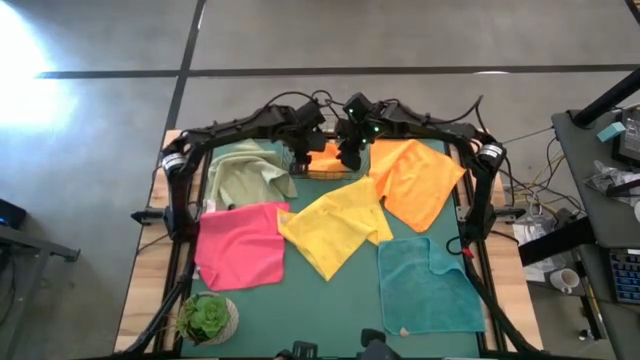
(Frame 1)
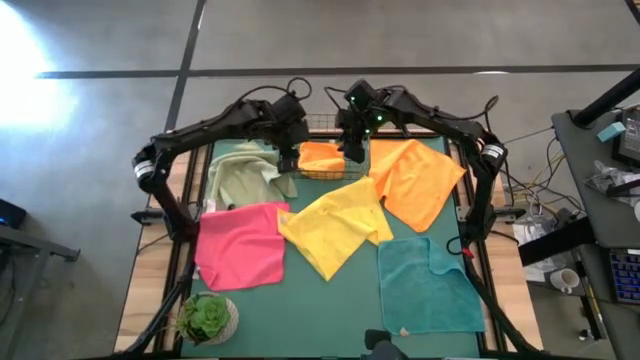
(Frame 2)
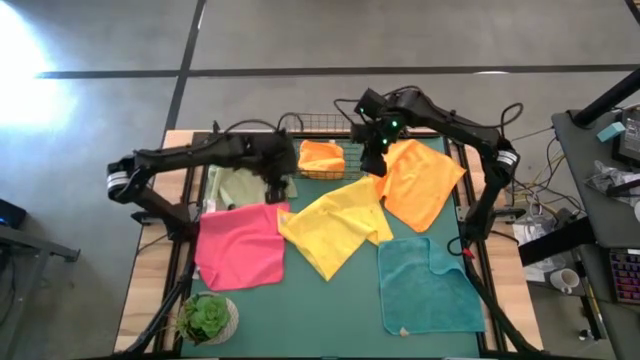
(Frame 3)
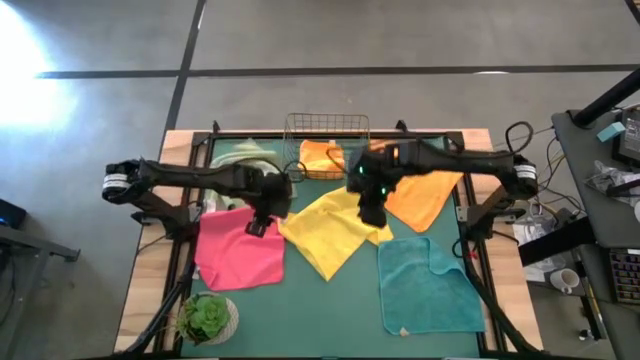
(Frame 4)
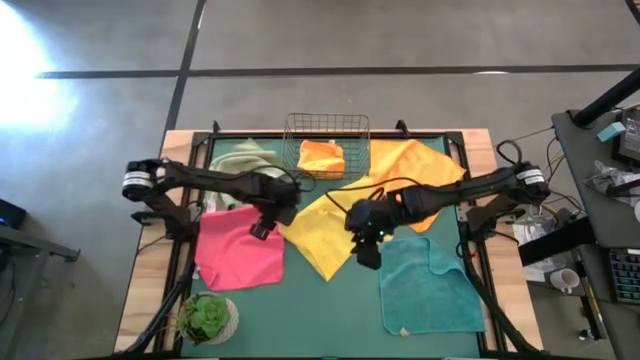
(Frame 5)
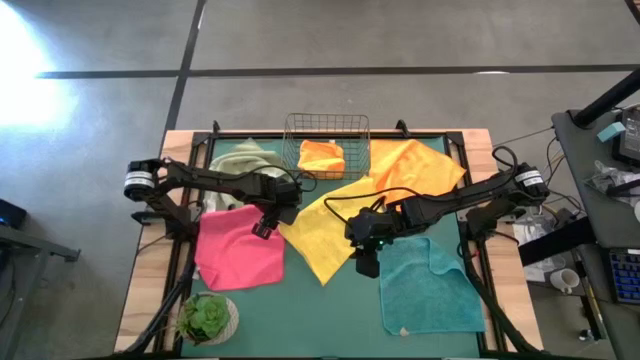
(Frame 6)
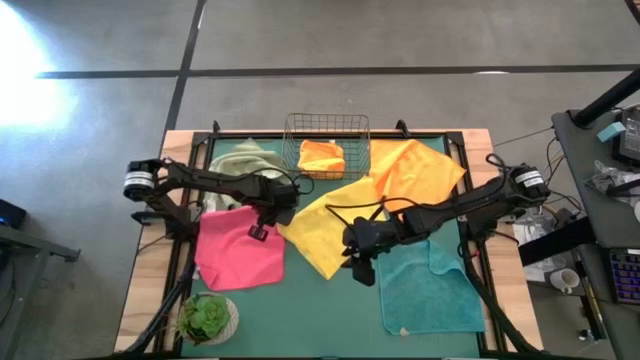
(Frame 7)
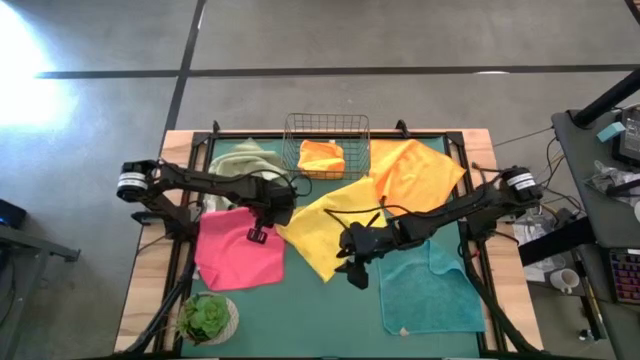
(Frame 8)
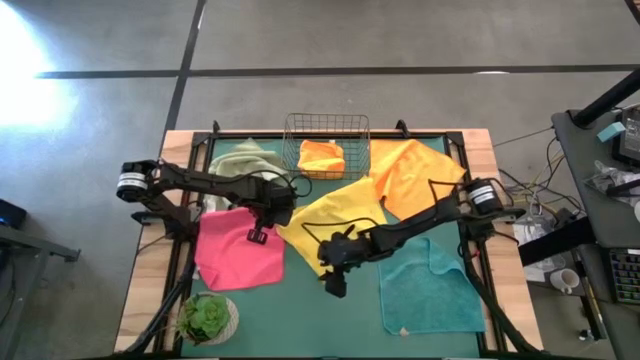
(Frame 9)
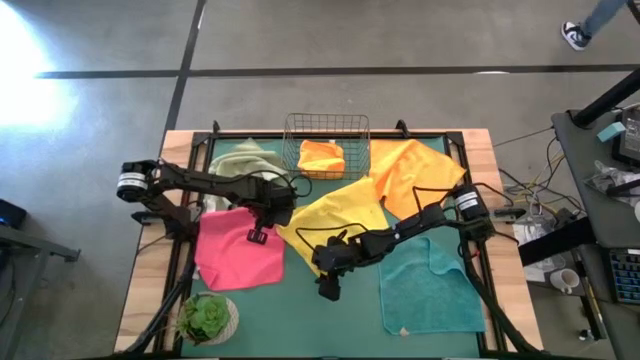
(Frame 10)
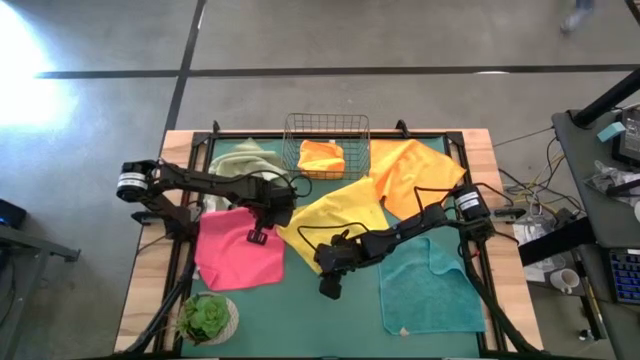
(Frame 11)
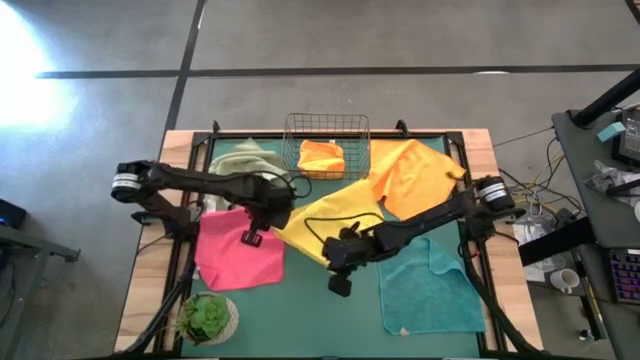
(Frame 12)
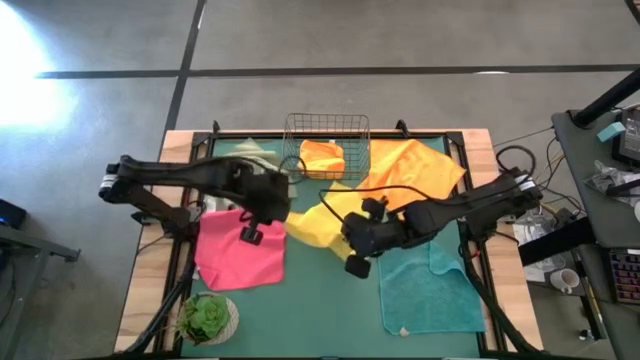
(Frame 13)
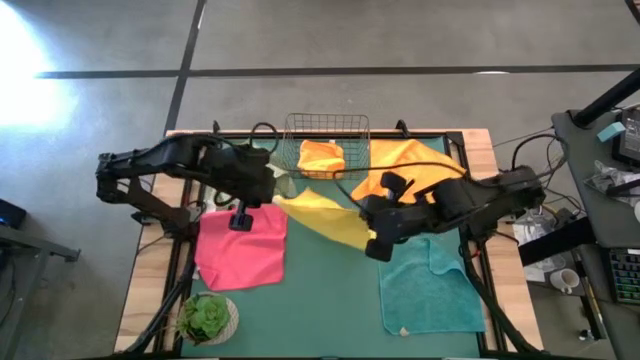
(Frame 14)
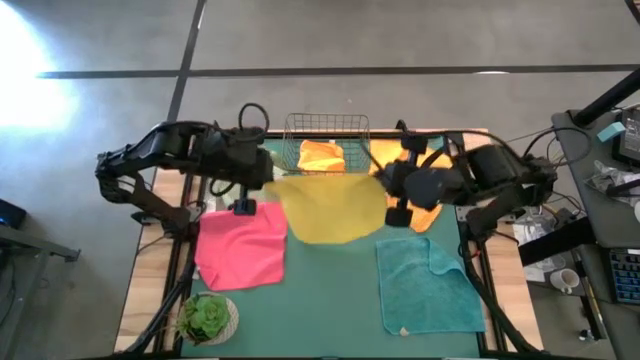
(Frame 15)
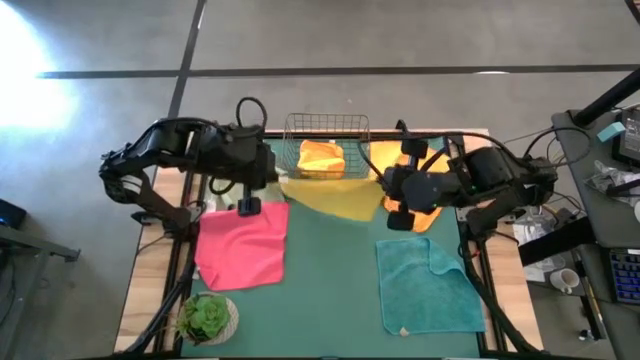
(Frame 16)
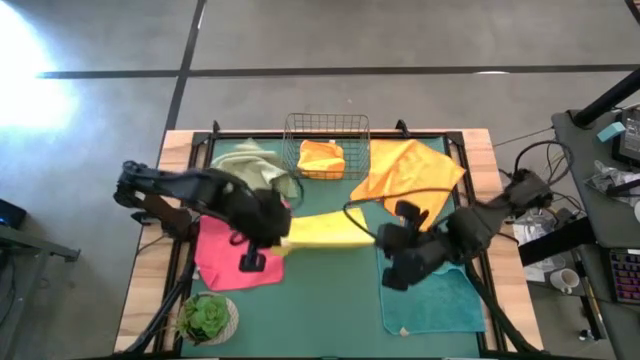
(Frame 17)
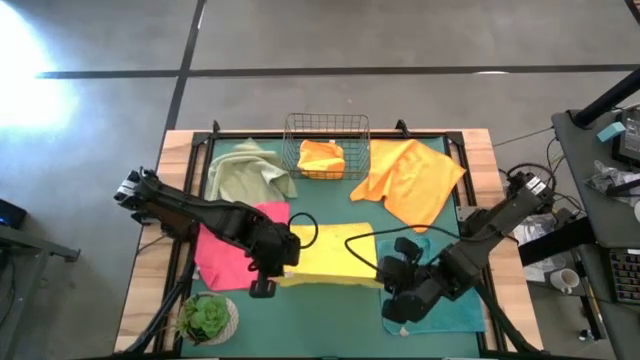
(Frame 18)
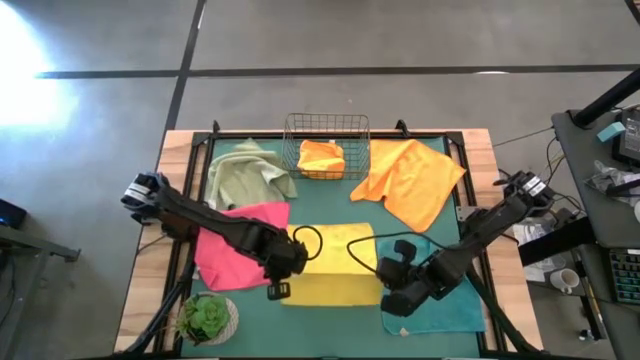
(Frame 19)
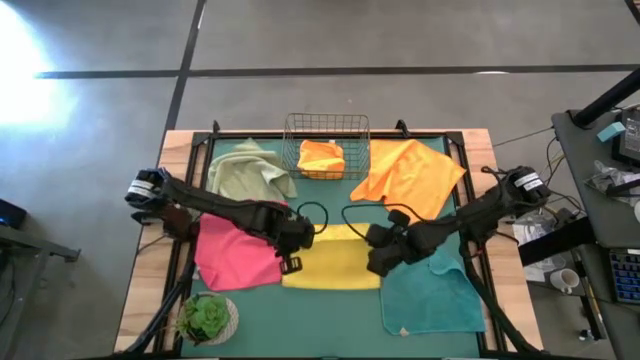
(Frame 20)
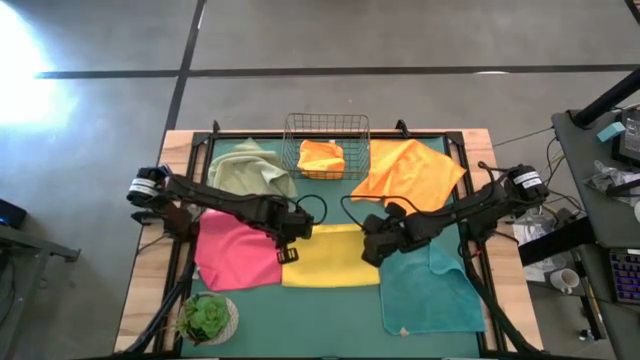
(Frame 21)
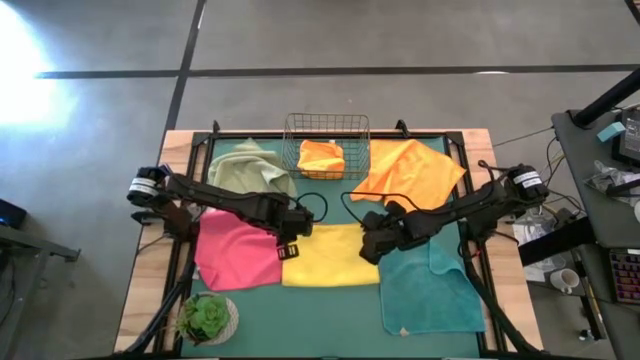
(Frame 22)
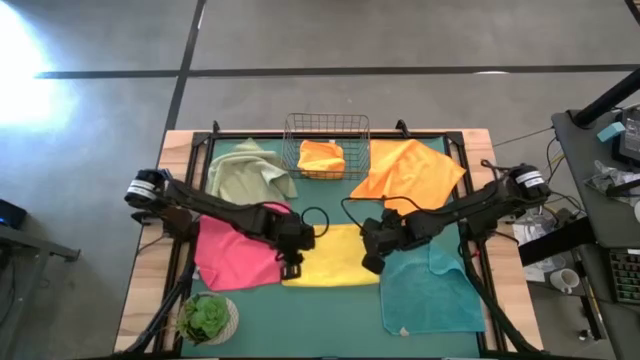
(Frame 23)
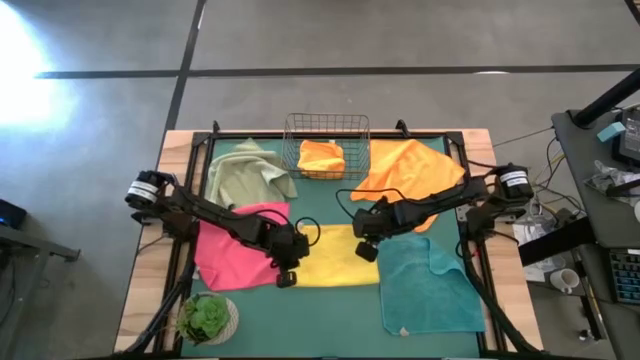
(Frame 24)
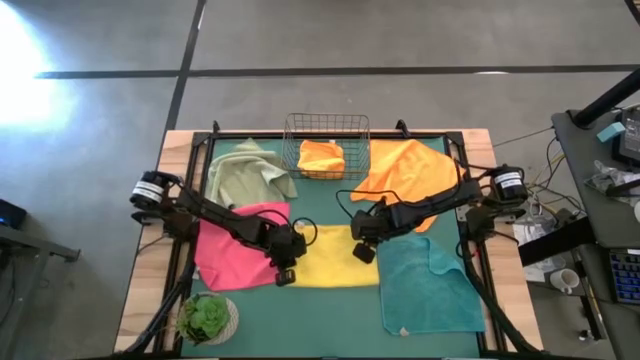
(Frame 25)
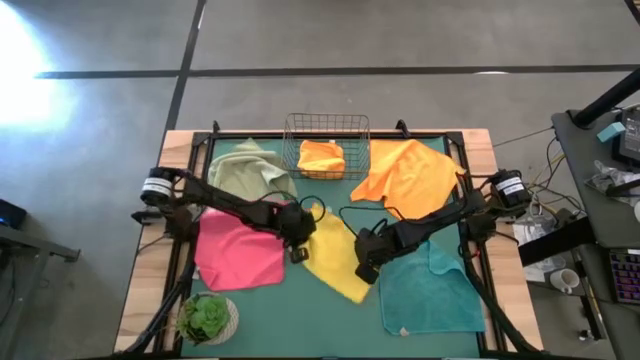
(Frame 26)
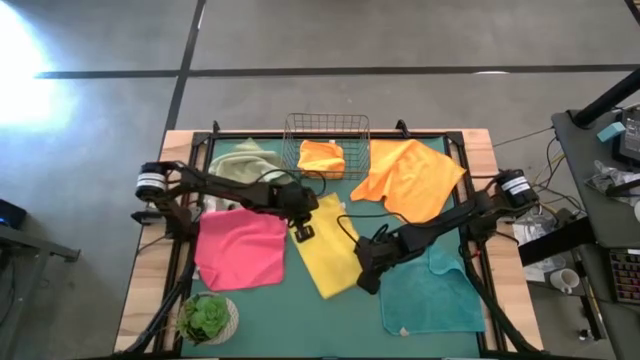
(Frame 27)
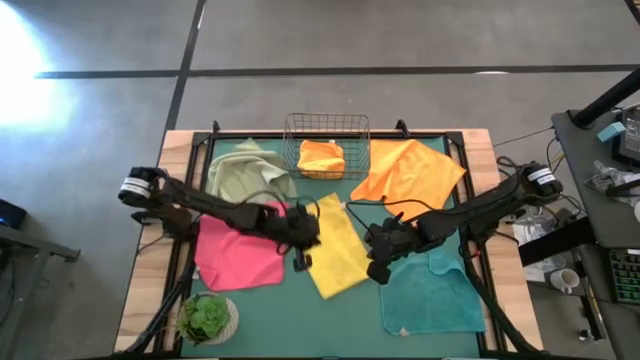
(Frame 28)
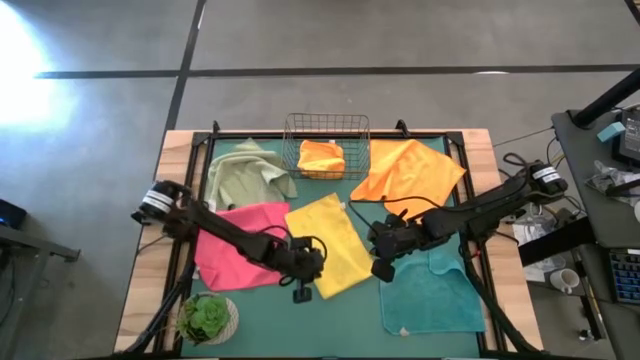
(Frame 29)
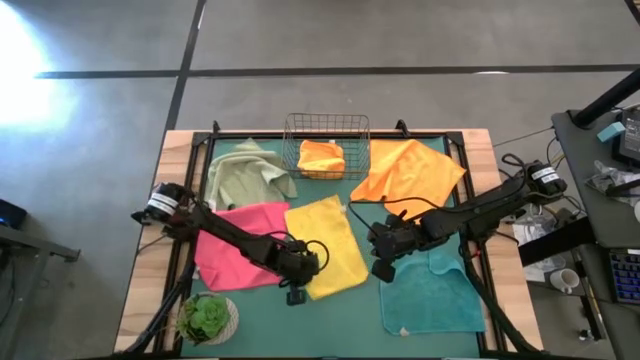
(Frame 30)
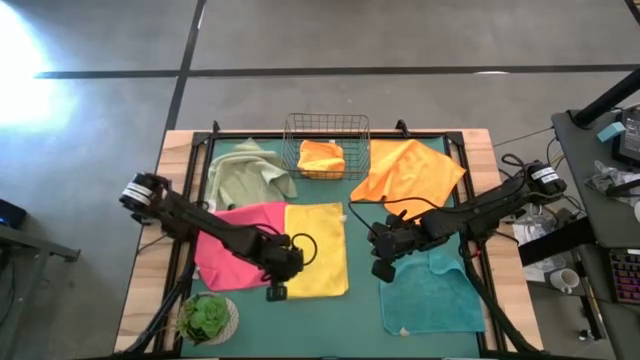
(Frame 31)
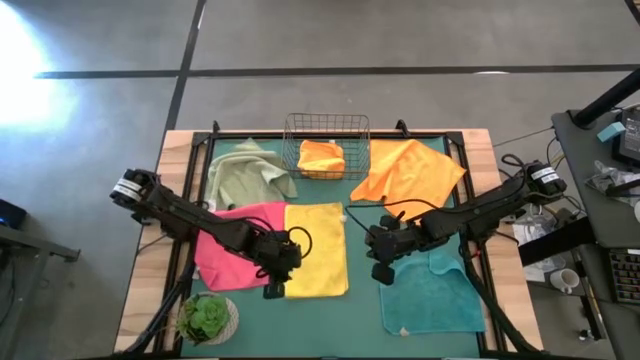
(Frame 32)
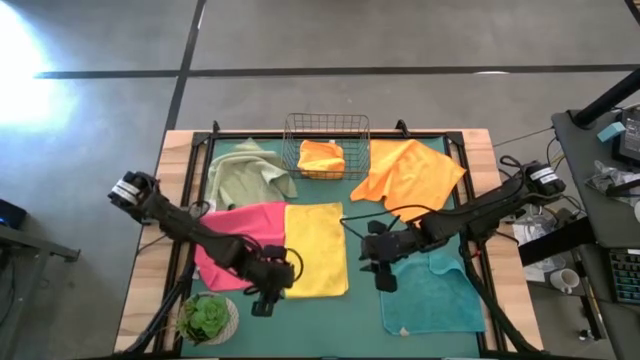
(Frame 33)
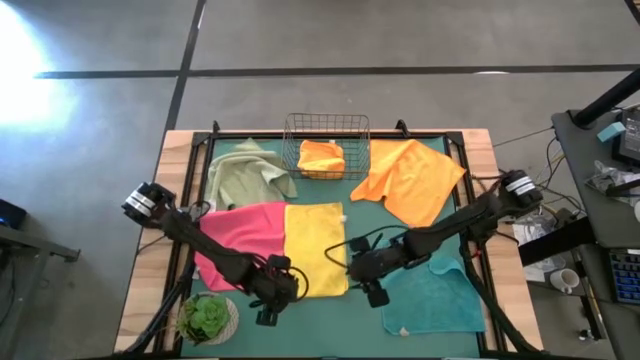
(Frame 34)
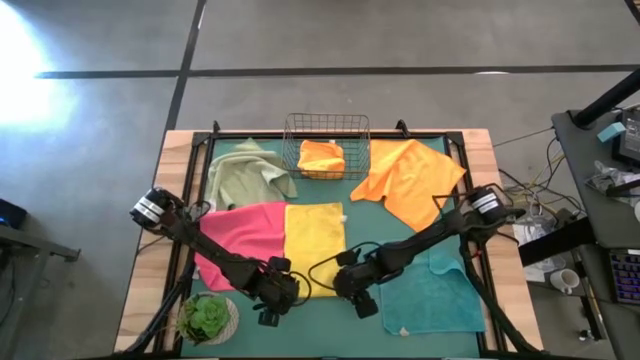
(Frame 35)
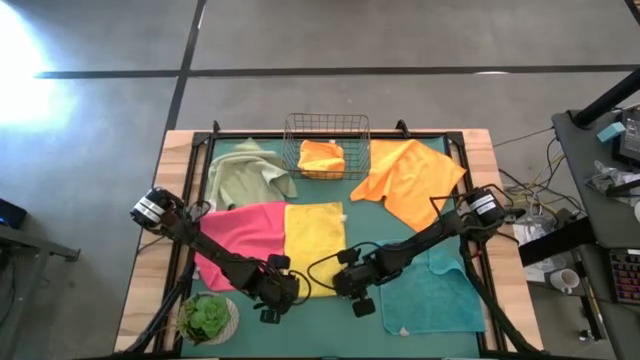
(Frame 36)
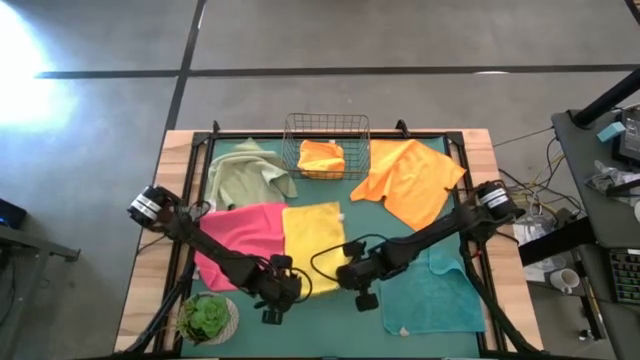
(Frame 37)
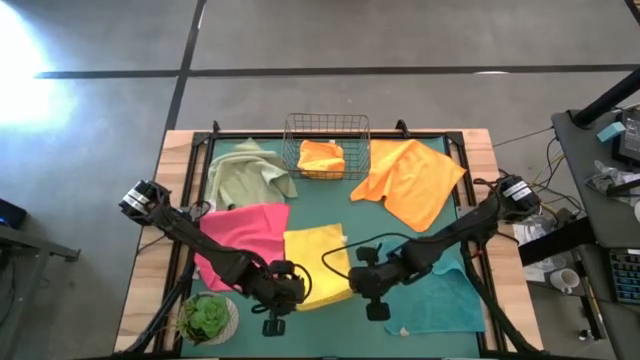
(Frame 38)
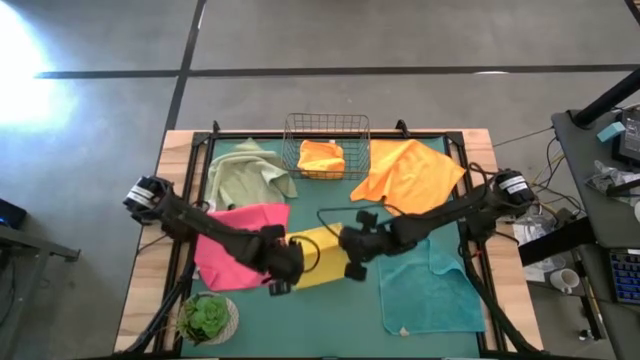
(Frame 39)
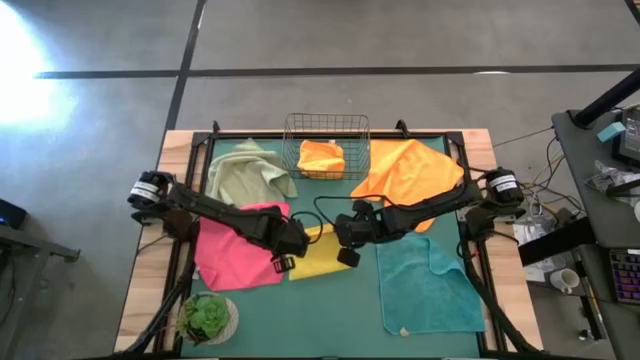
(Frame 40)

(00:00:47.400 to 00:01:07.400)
Task: Fold microfiber towels
Fold the yellow microfiber towel
